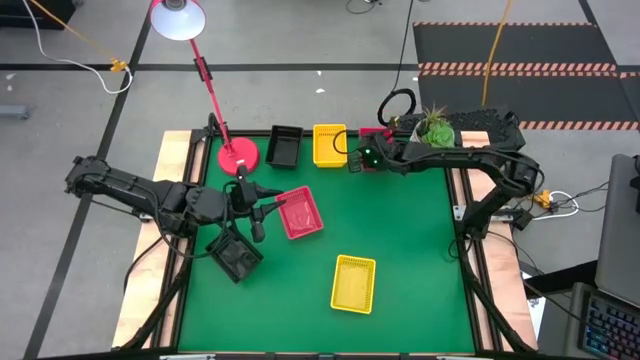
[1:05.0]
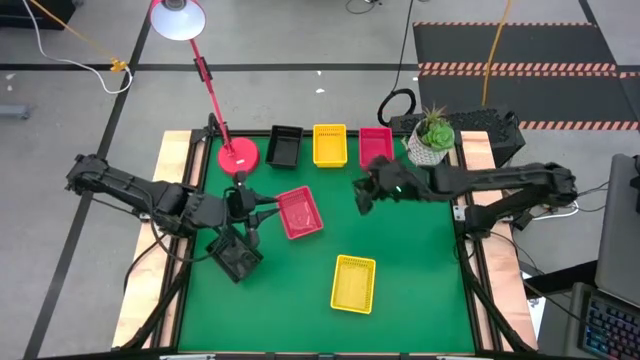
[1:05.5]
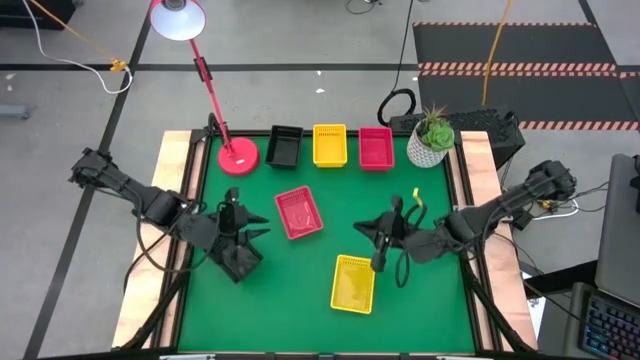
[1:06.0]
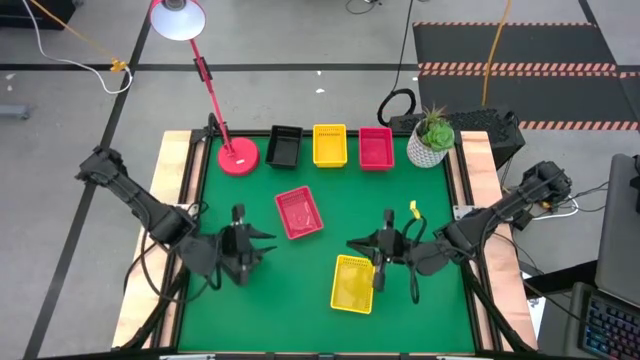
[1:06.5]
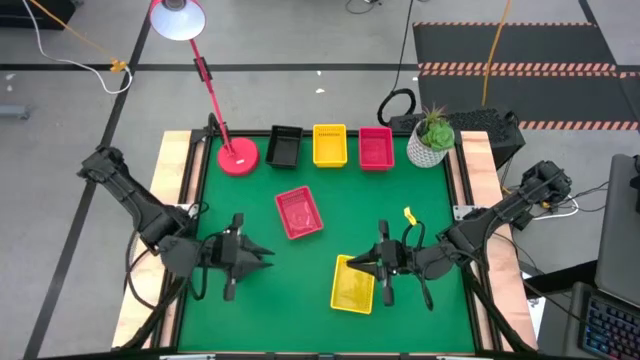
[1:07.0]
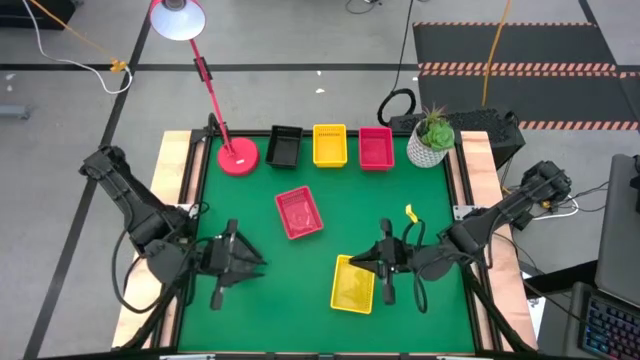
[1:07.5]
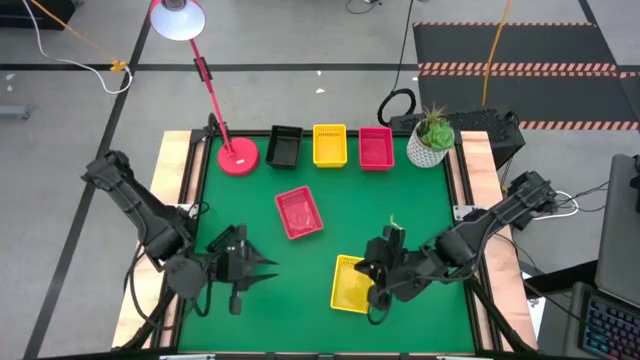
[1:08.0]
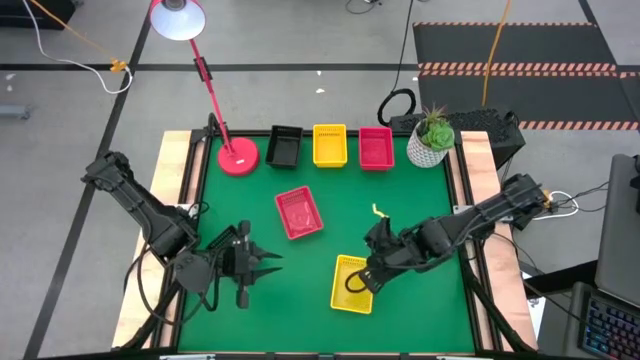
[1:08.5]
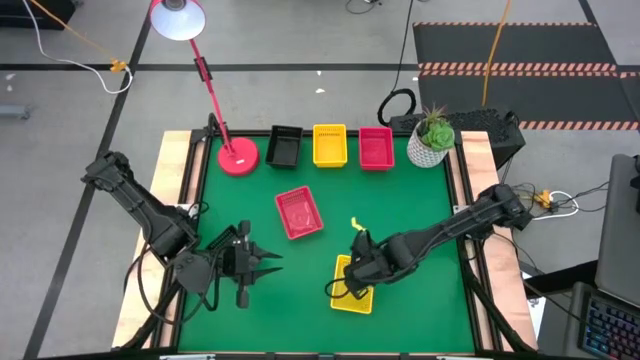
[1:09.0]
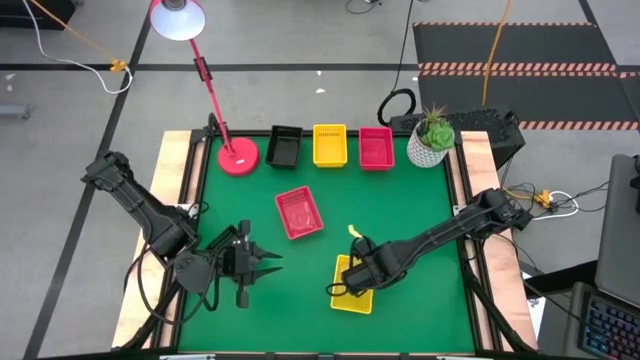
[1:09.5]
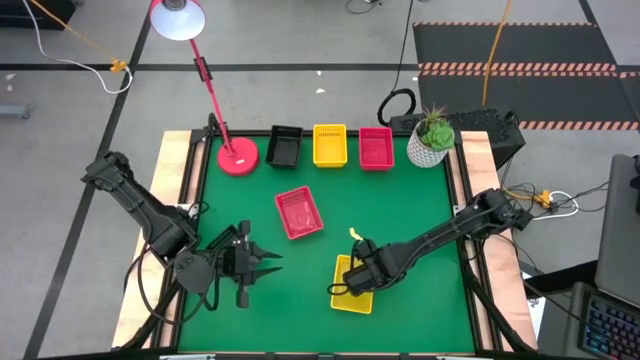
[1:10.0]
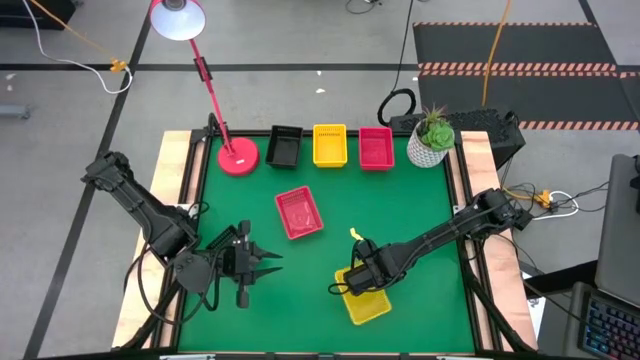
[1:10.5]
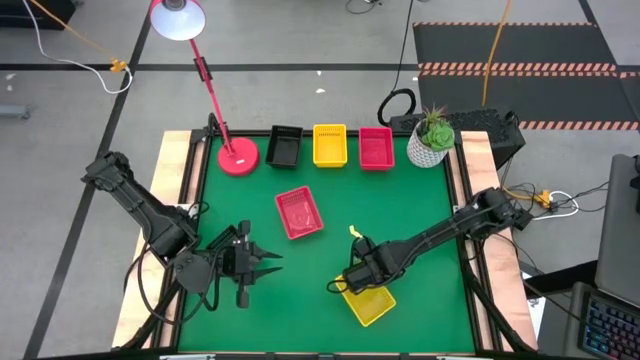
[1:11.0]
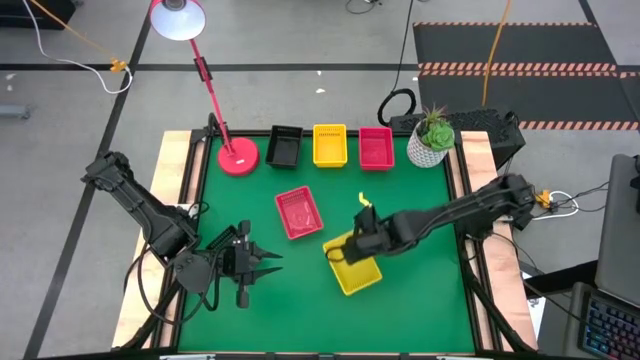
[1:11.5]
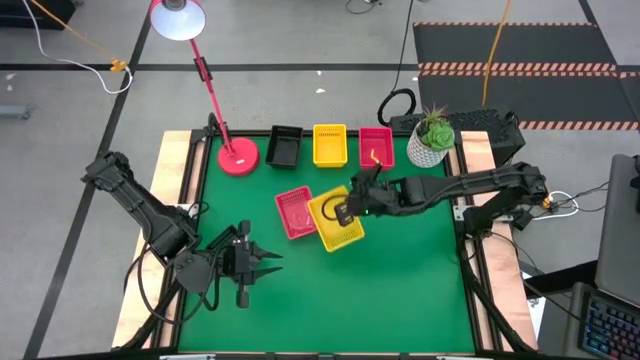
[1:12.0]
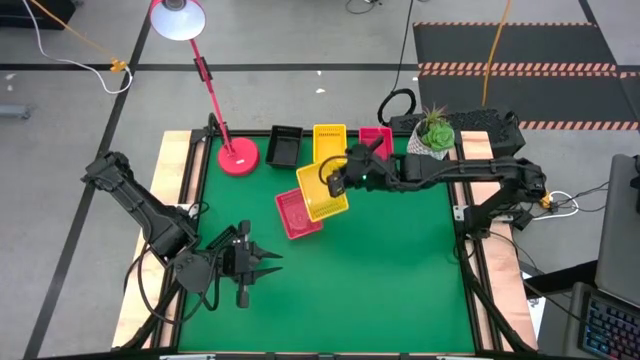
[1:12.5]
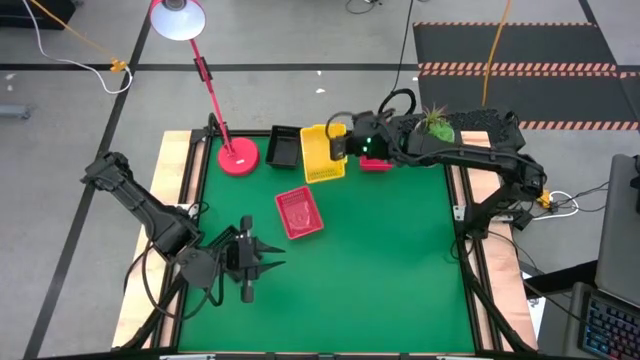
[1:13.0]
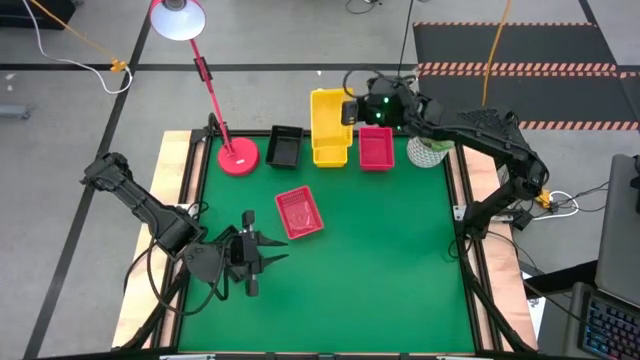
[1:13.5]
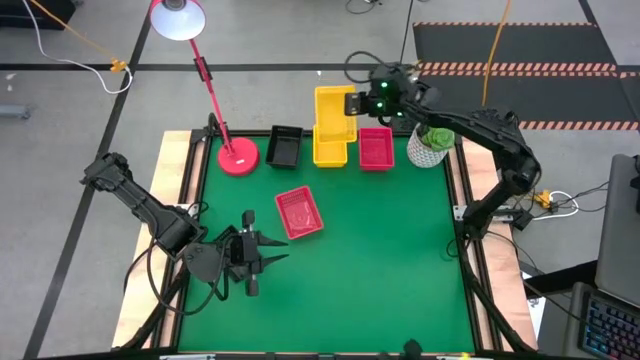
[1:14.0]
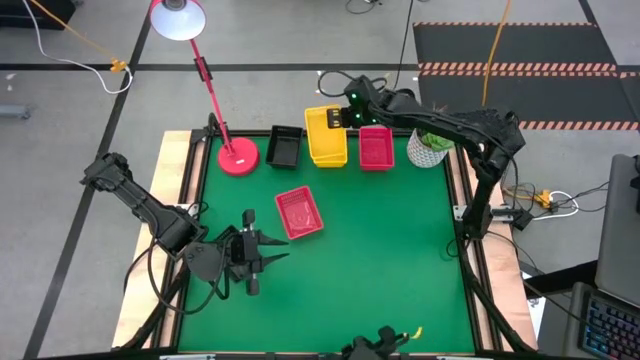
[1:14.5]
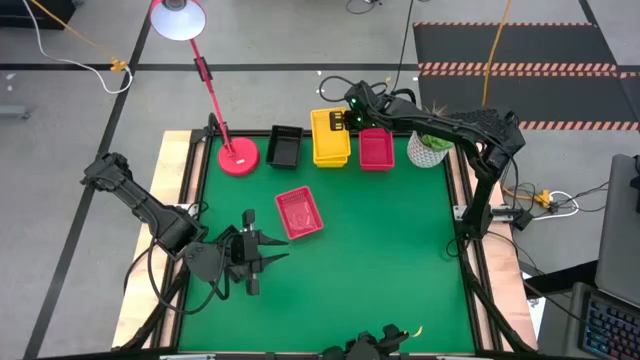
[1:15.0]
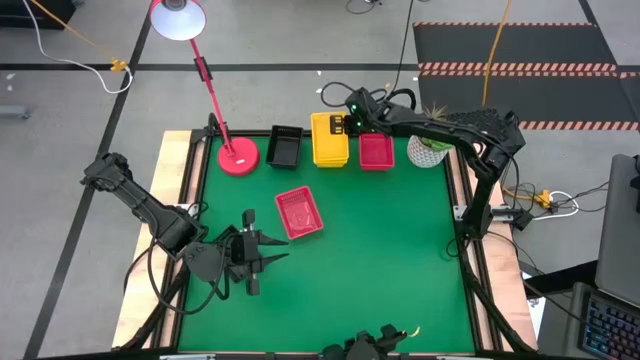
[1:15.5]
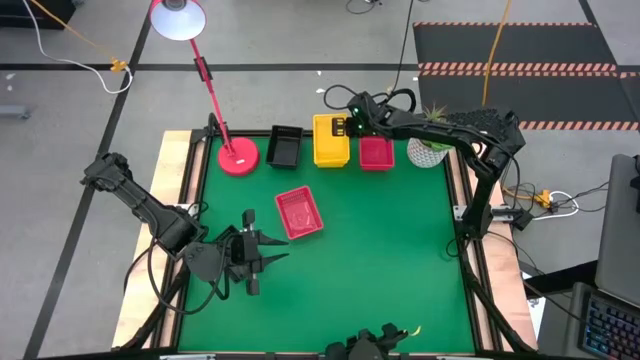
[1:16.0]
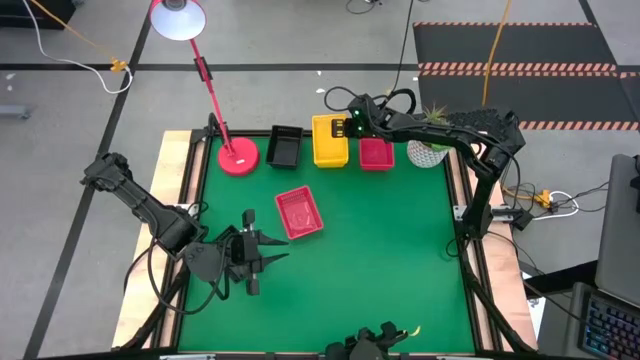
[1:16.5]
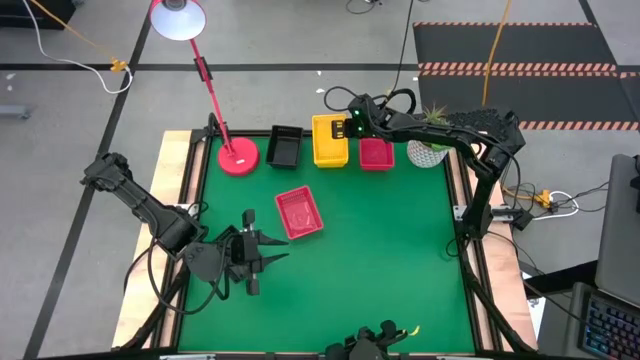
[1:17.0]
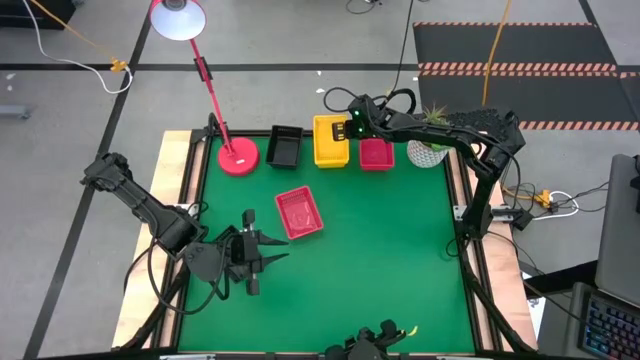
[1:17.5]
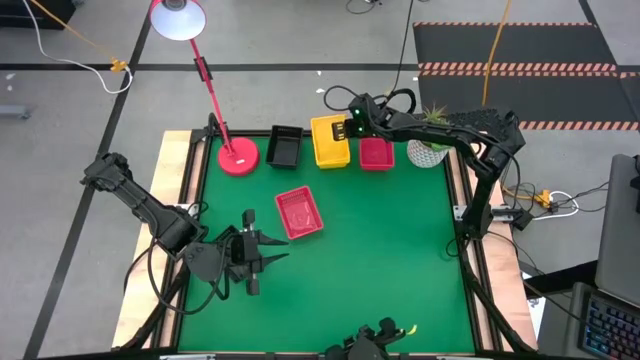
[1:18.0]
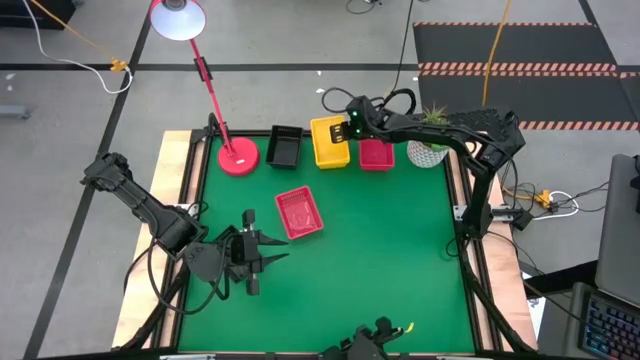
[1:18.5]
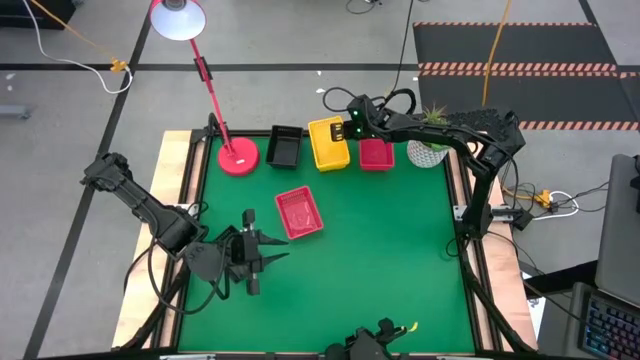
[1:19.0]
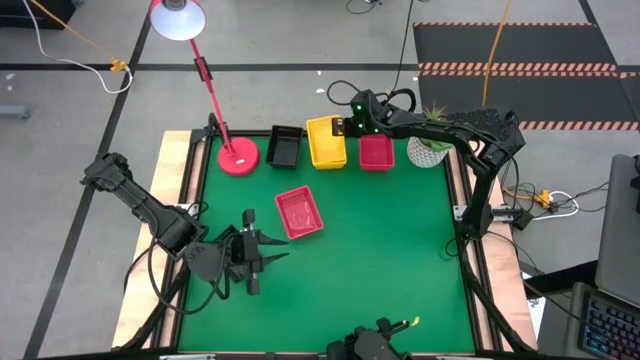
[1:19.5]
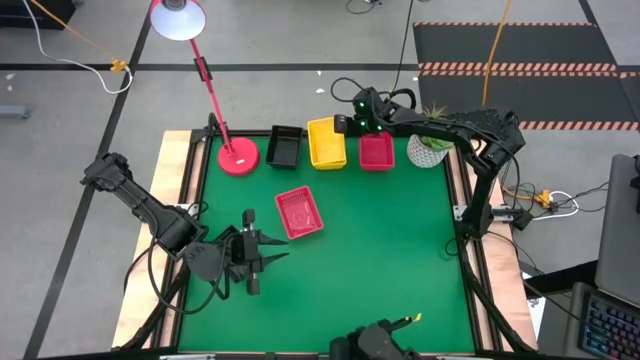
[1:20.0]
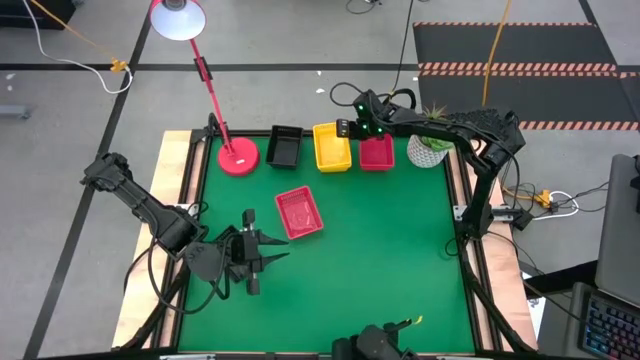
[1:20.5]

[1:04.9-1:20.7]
Stack the bottom yellow bin on the top stacked yellow bin

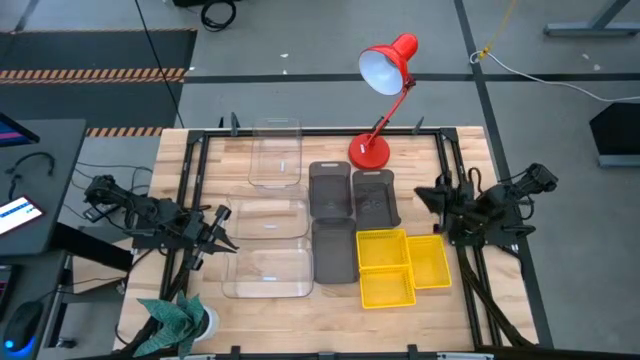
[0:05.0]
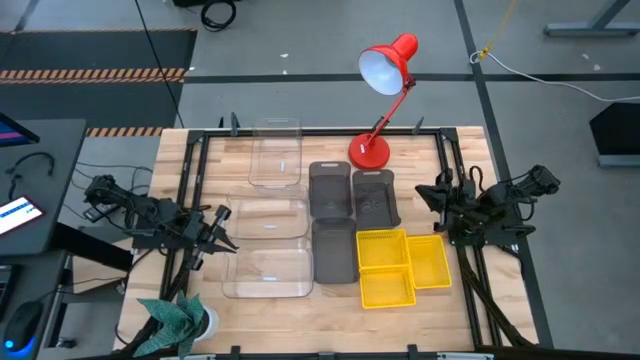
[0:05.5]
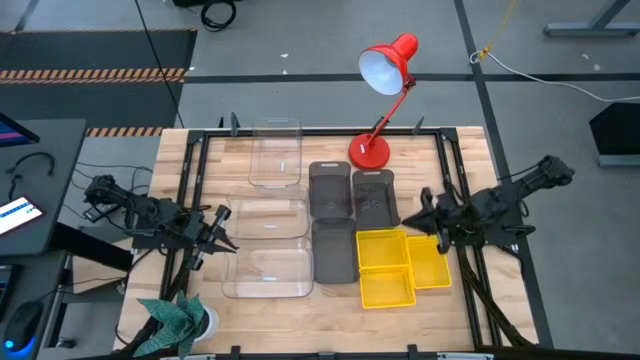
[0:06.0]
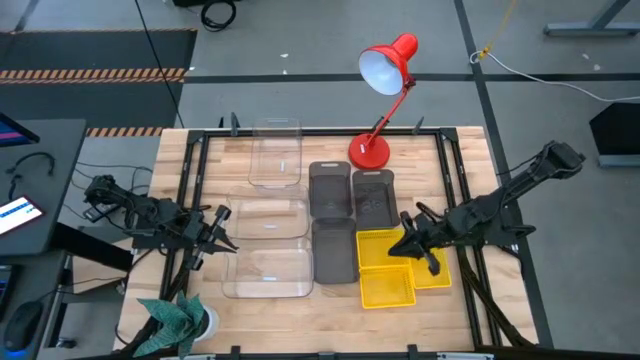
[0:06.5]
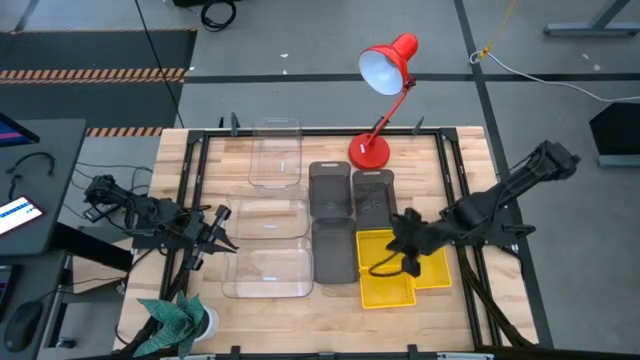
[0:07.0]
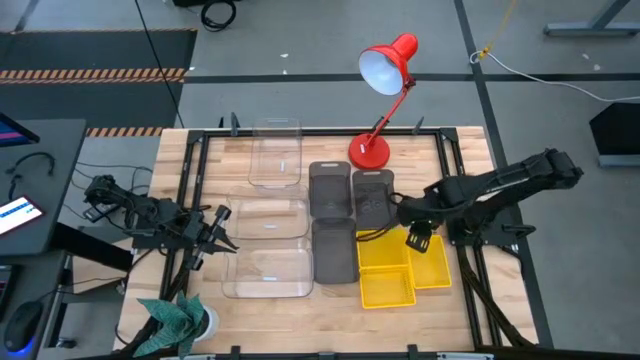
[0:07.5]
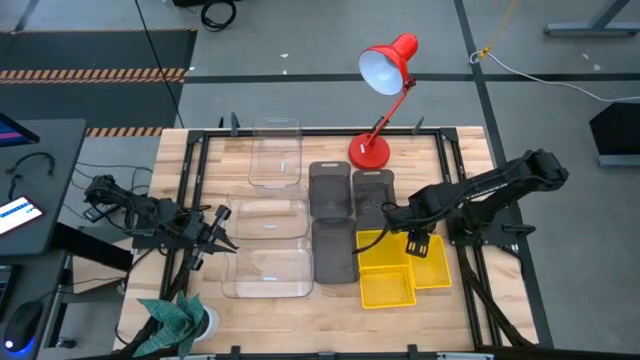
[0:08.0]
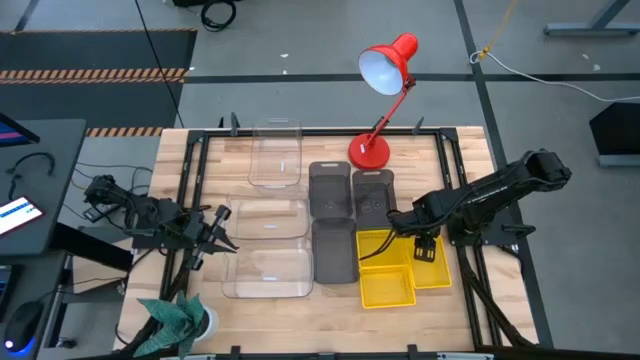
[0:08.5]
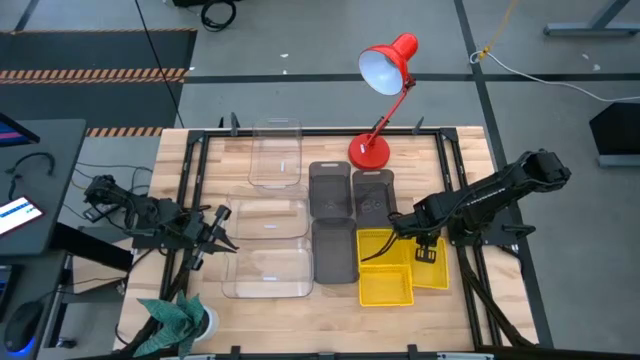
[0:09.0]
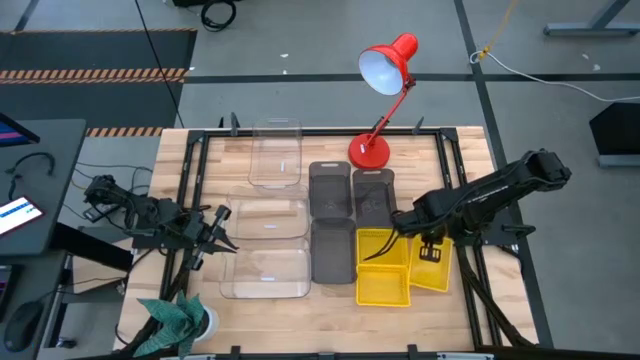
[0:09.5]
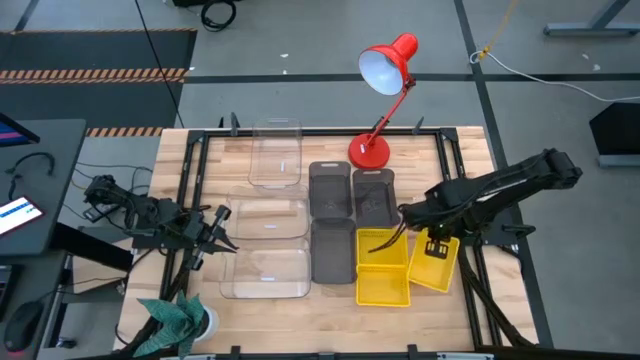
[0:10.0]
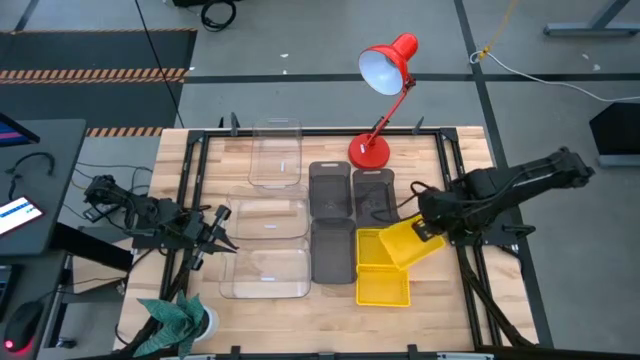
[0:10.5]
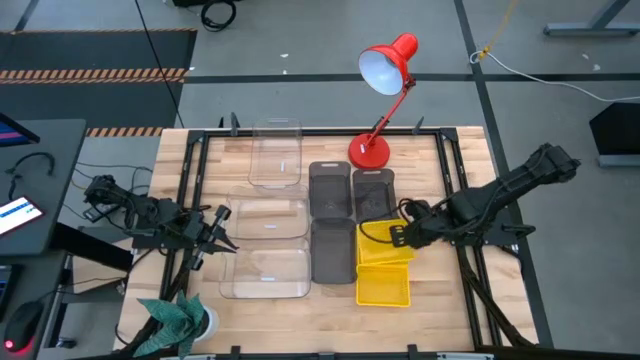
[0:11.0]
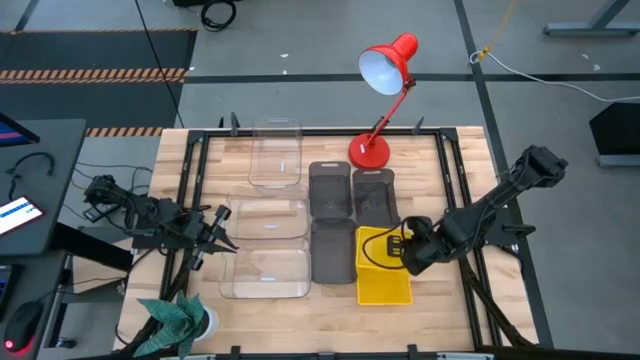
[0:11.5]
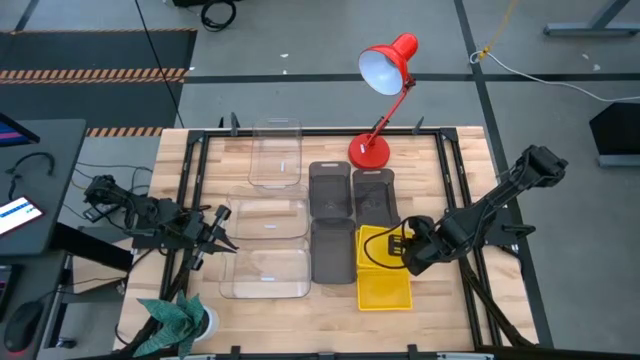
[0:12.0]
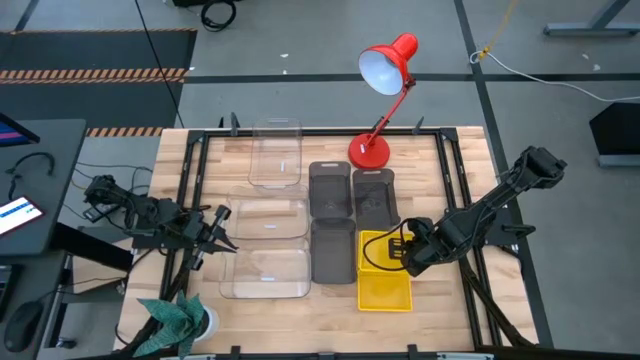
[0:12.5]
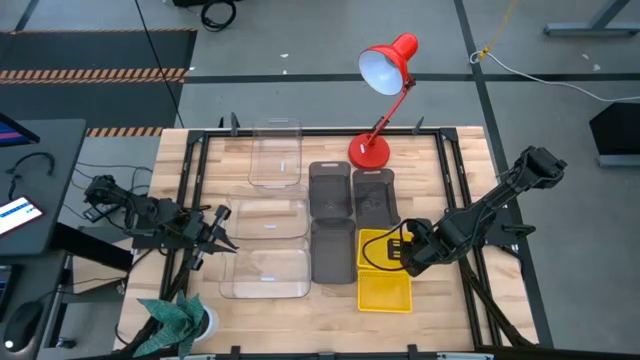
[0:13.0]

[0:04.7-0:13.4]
Stack the right yellow bin on the left yellow bin
